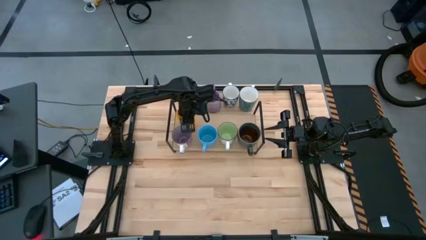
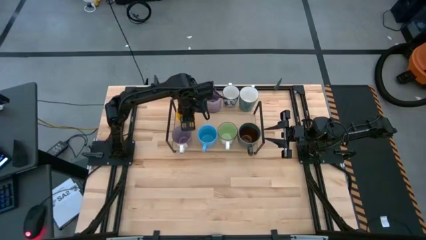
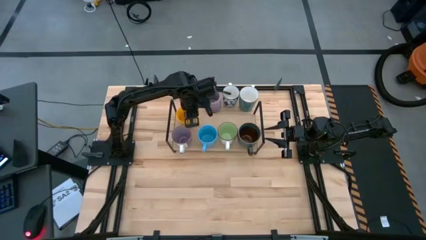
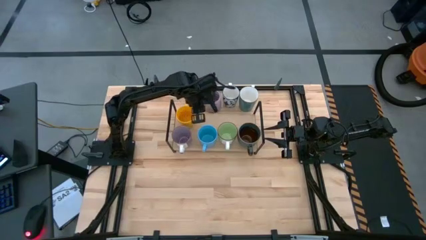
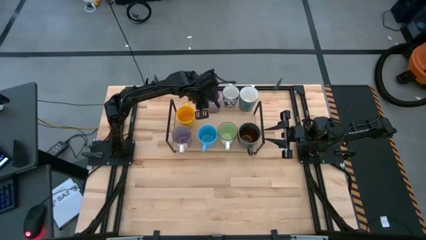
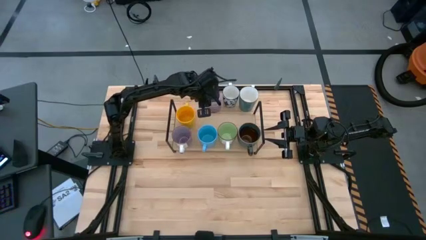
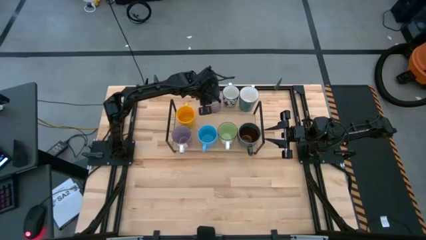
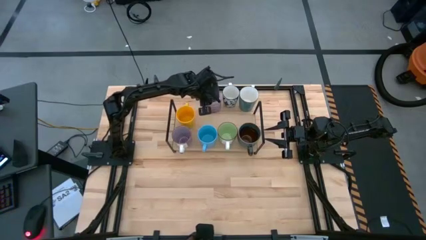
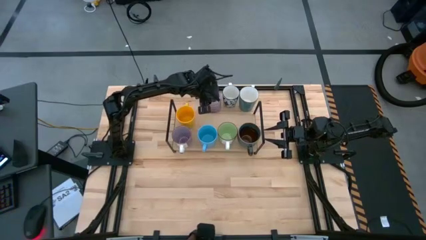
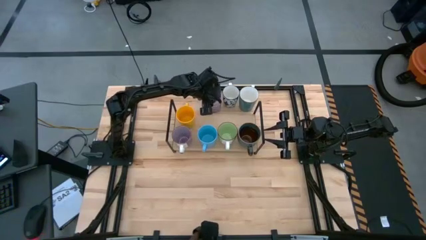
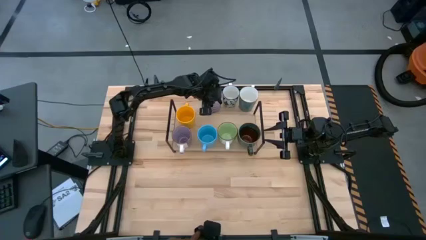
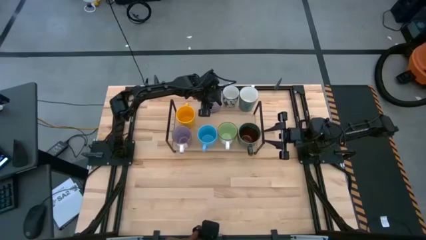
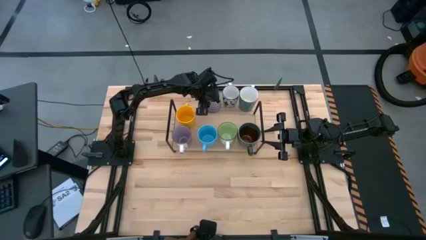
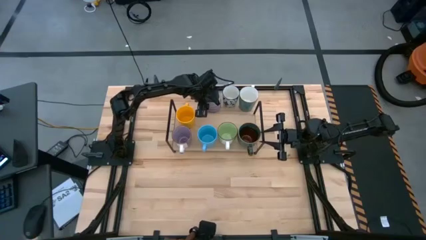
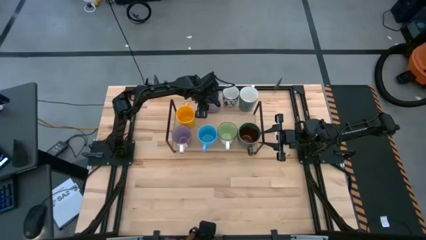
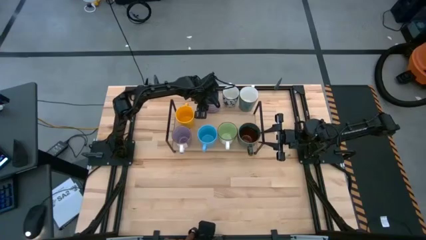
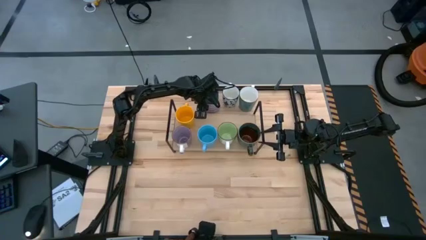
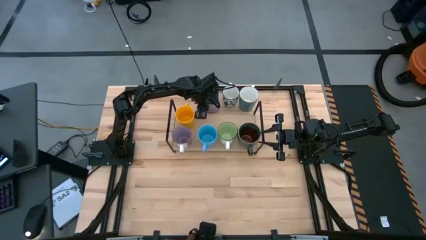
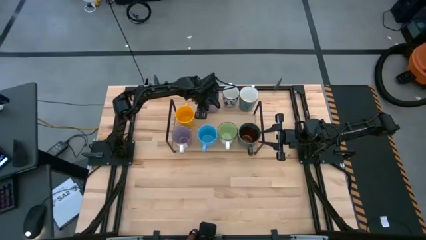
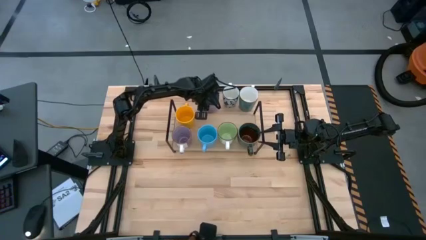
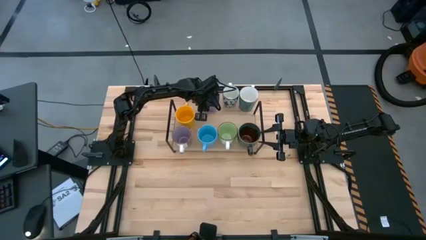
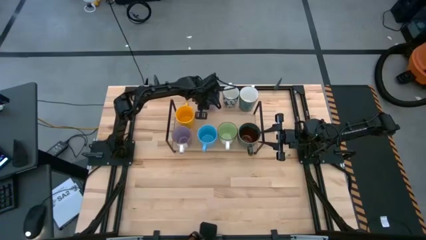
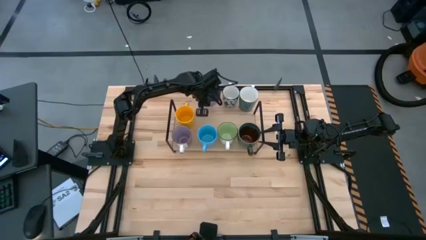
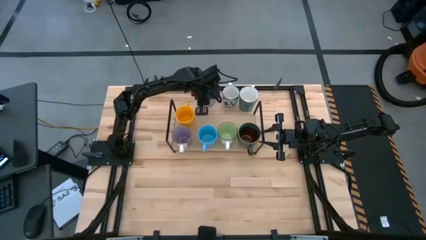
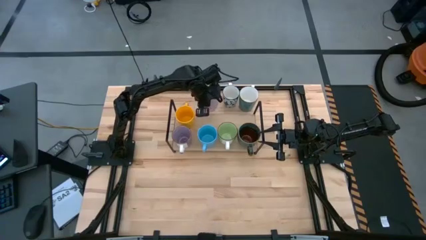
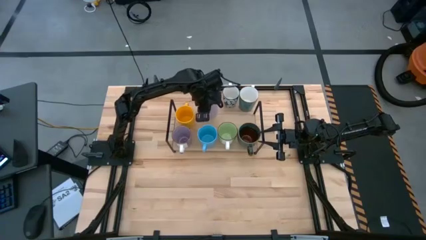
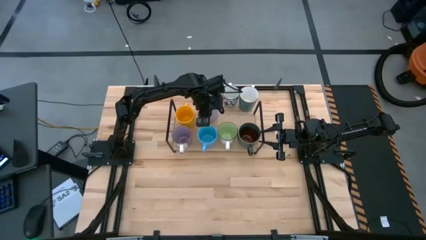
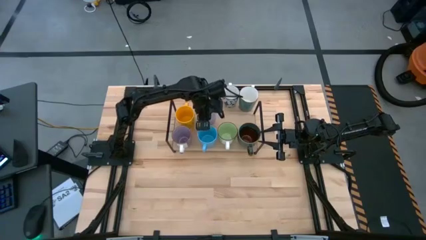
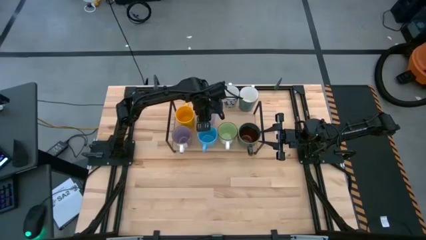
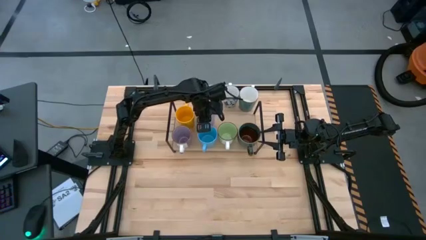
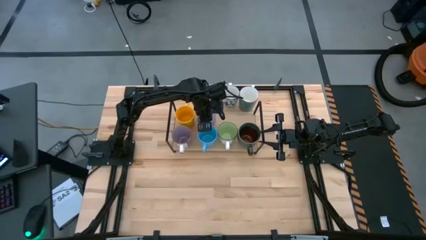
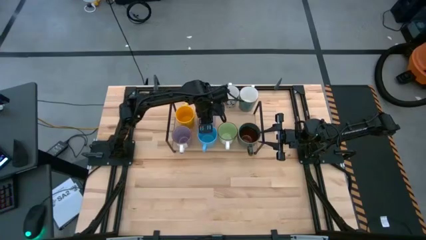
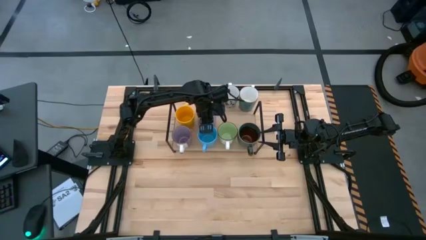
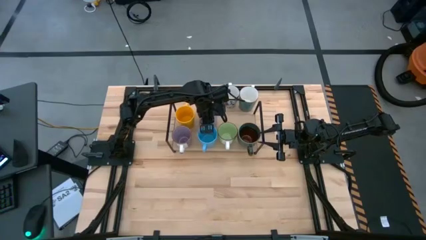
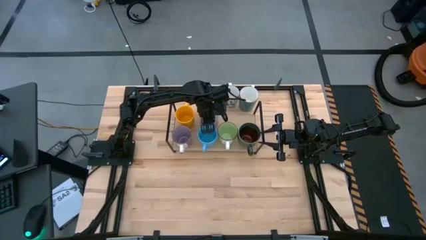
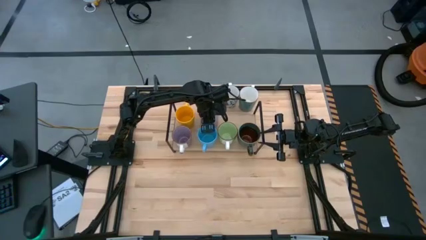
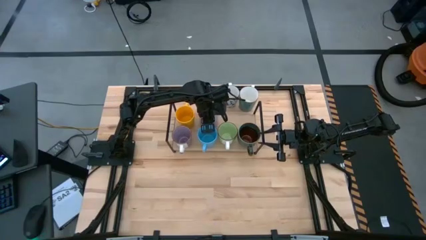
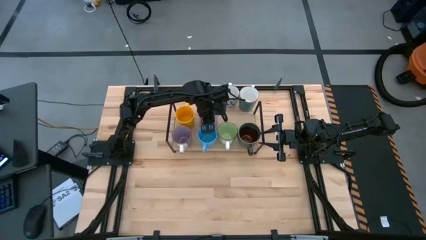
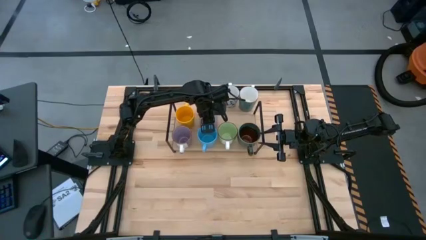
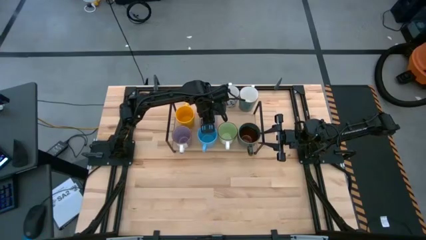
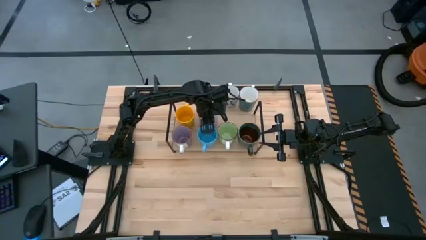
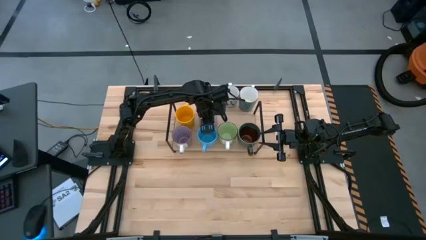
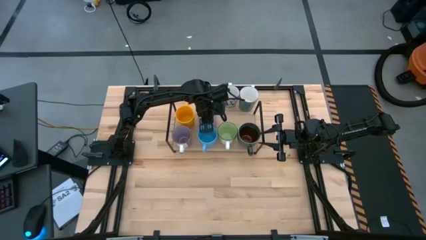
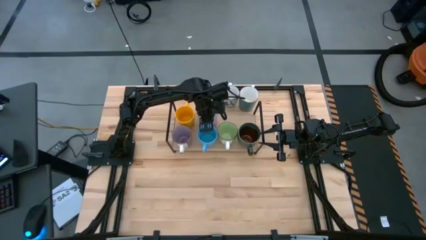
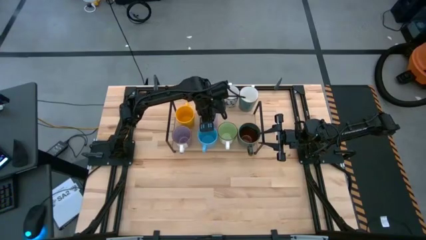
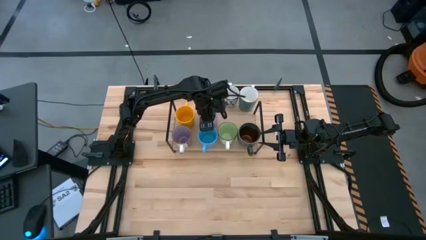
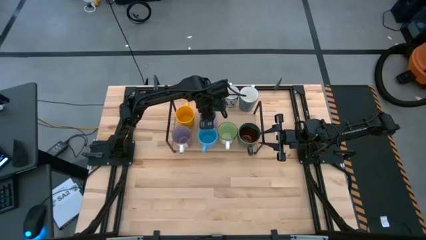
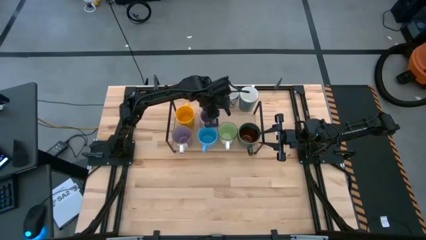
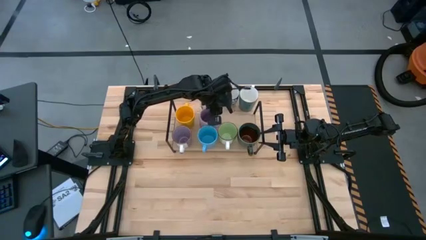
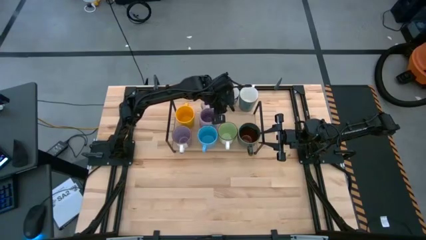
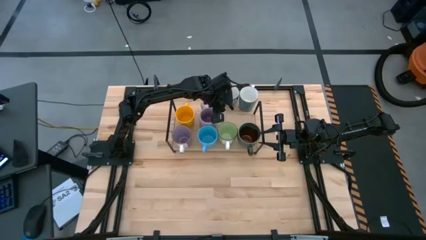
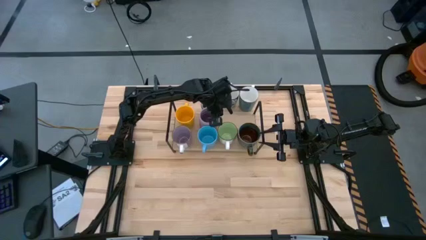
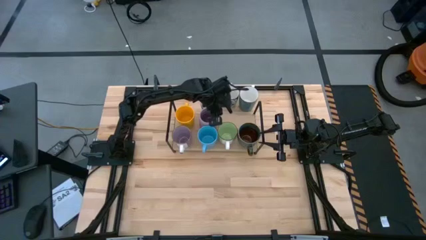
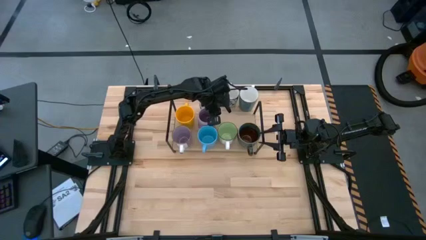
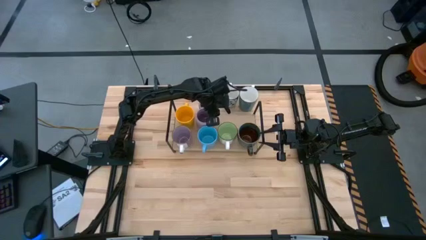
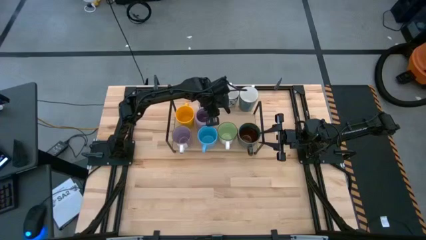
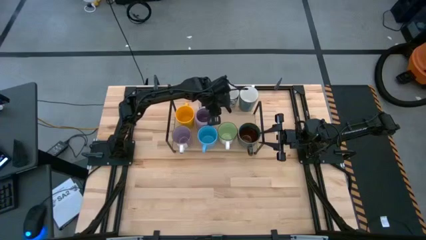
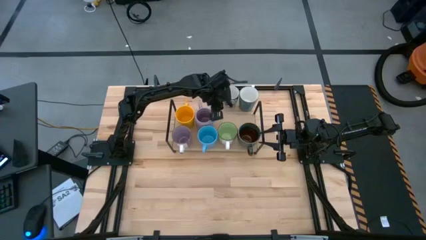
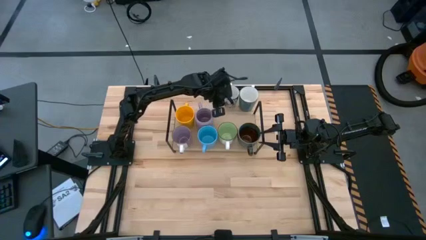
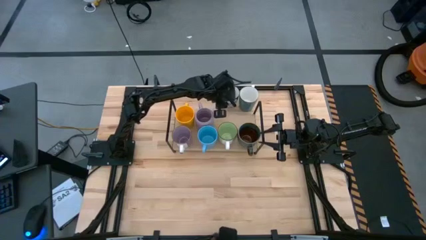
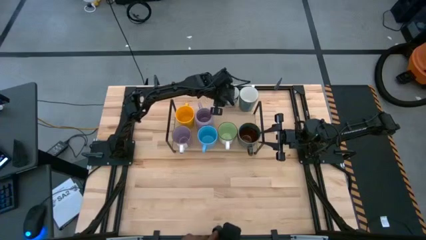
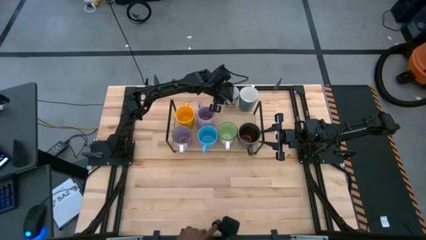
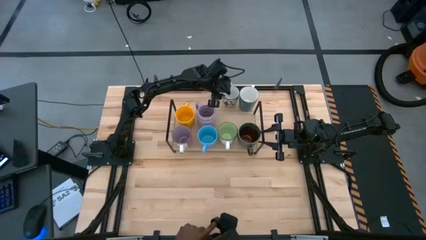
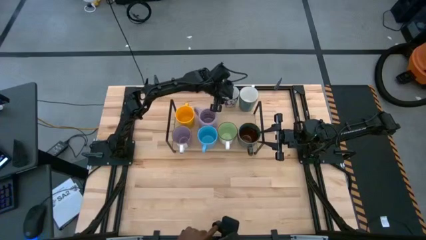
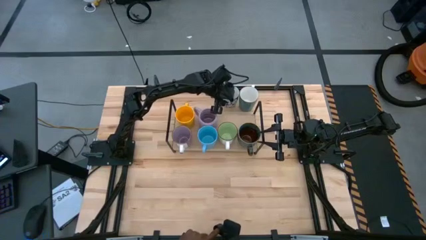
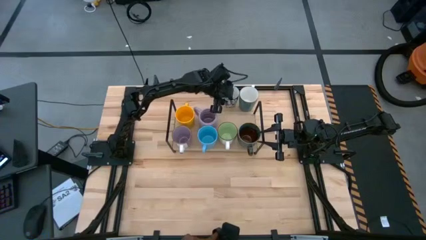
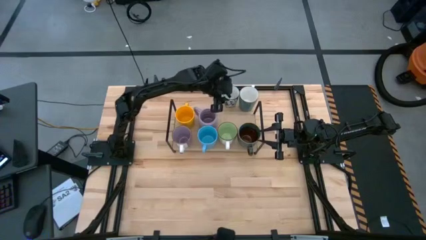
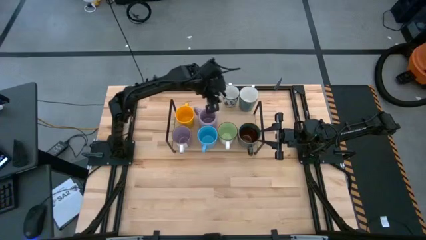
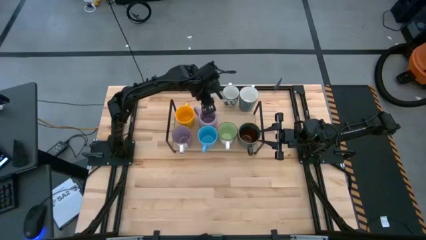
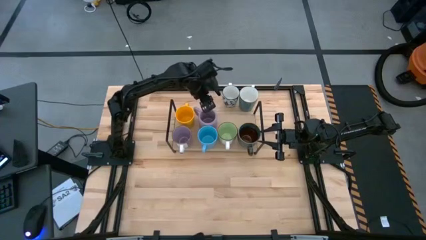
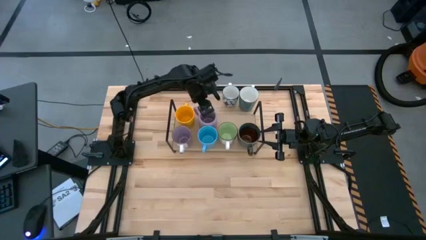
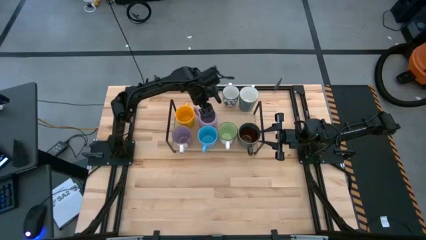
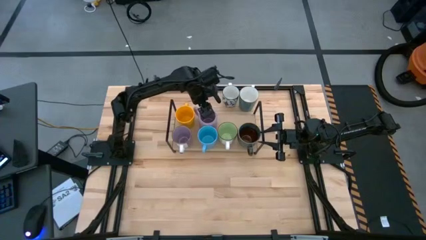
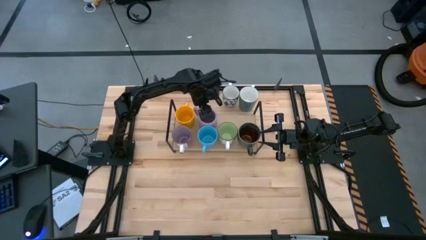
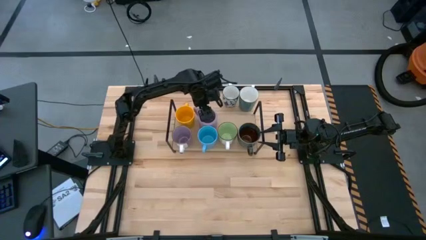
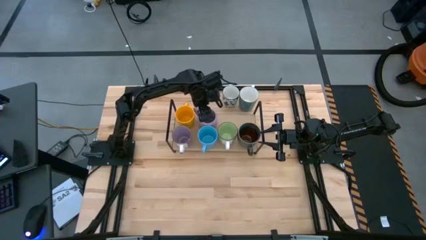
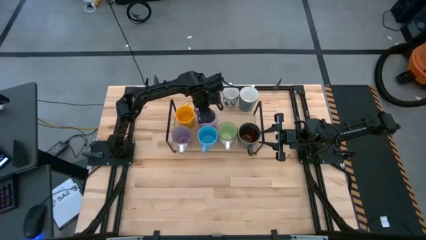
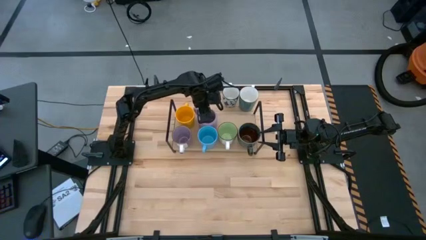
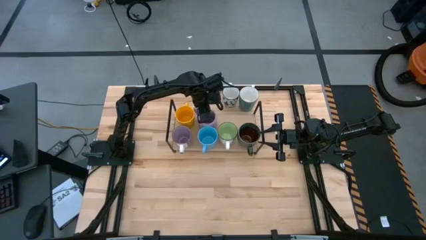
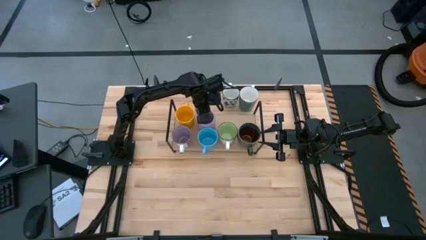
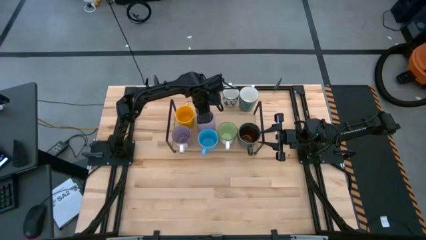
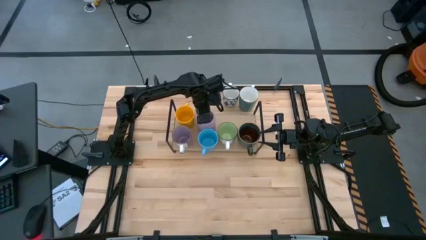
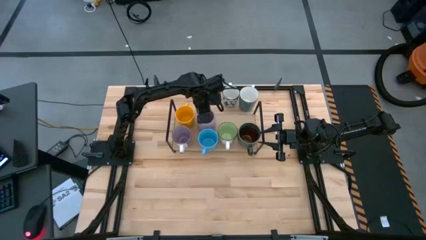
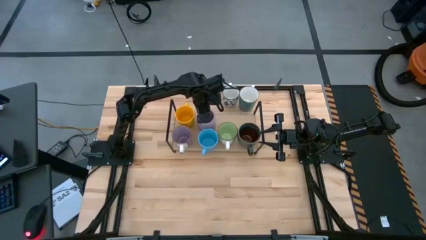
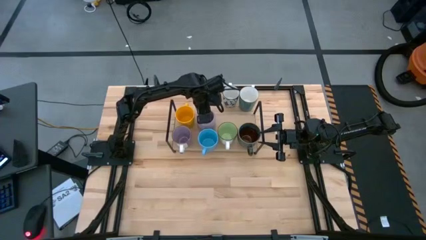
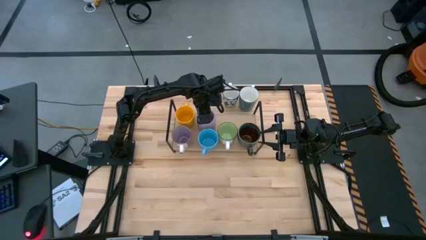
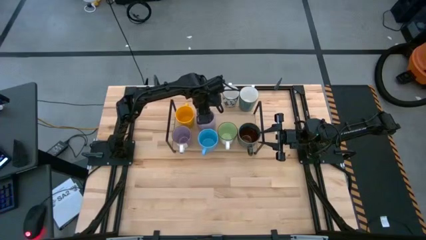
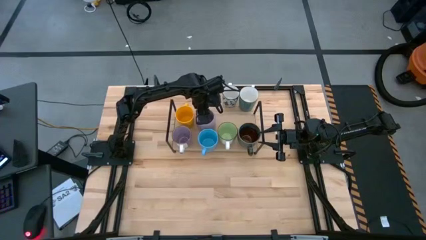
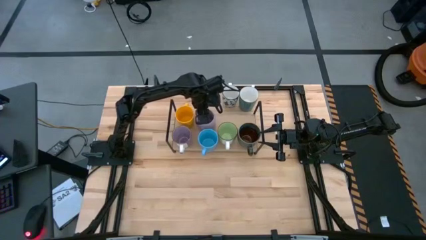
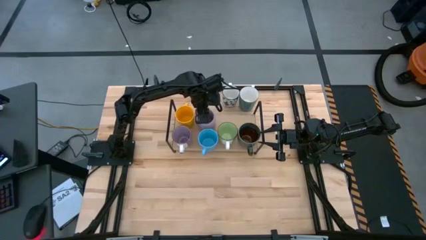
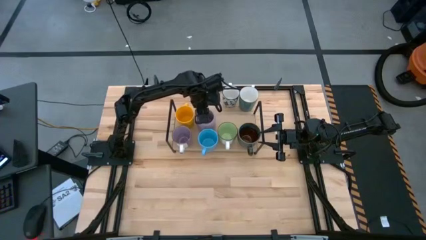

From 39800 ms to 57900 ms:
Task: Place coffee mugs
Put the violet mug on the shelf
